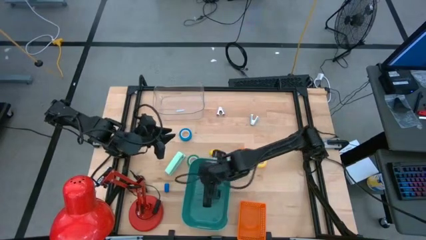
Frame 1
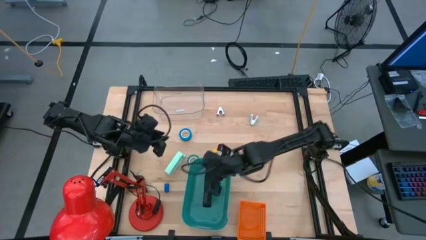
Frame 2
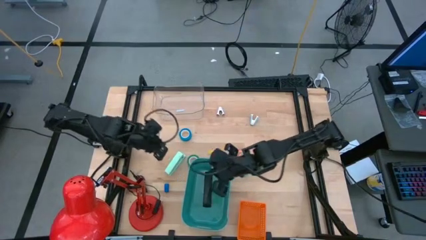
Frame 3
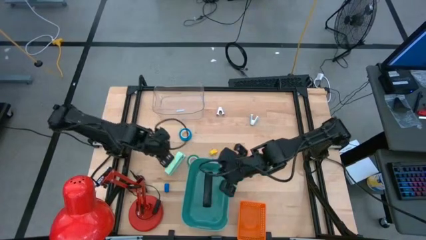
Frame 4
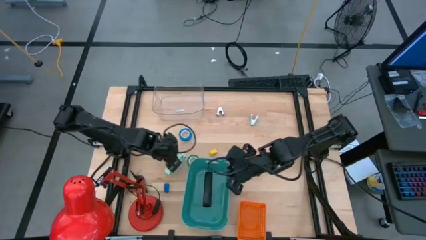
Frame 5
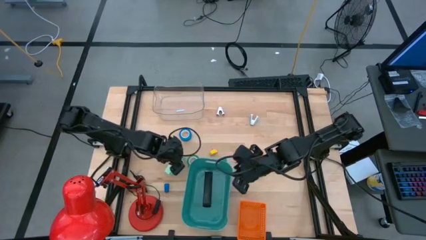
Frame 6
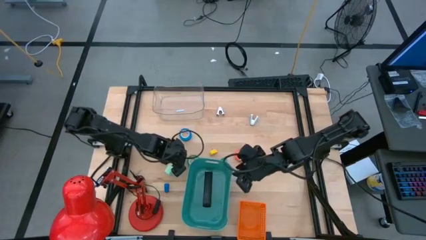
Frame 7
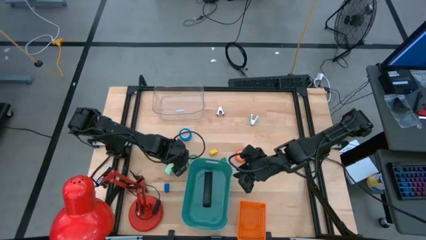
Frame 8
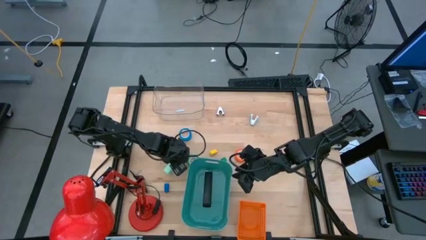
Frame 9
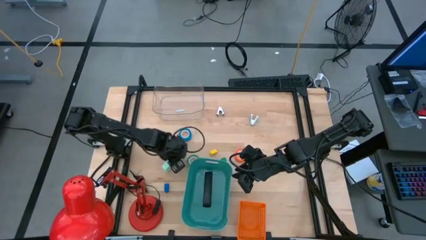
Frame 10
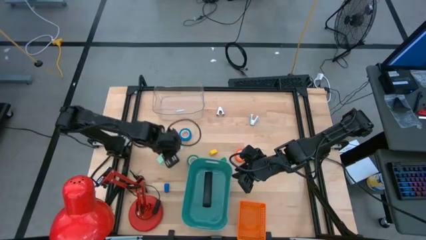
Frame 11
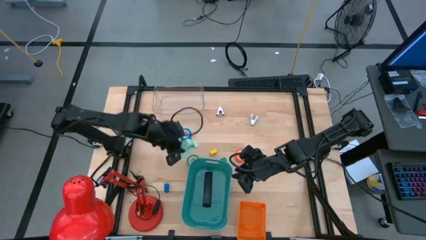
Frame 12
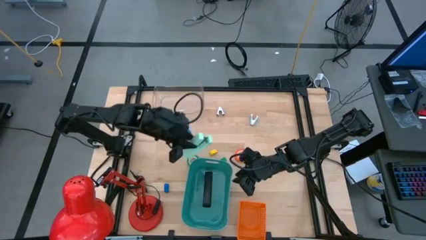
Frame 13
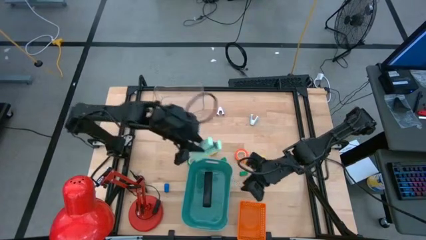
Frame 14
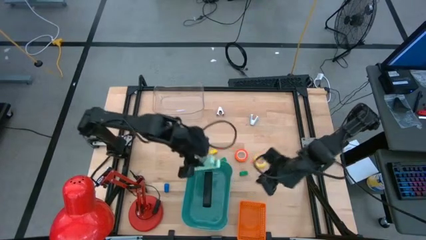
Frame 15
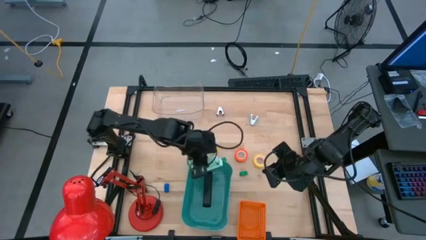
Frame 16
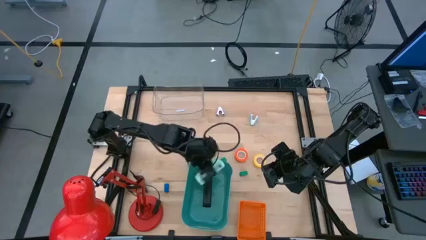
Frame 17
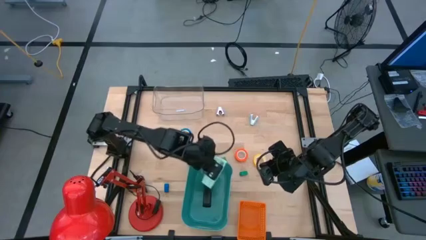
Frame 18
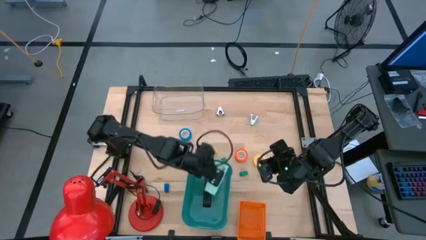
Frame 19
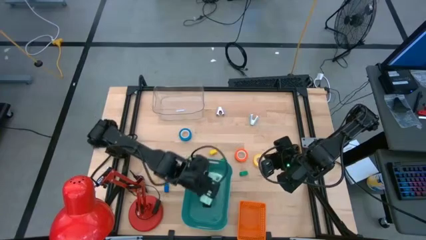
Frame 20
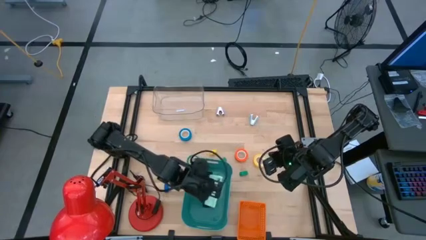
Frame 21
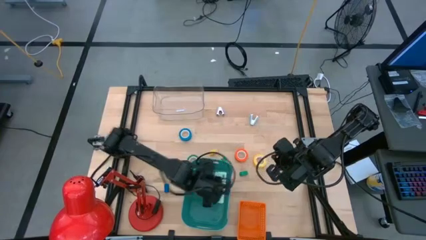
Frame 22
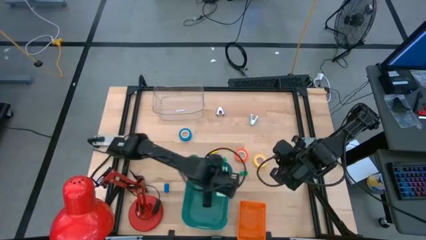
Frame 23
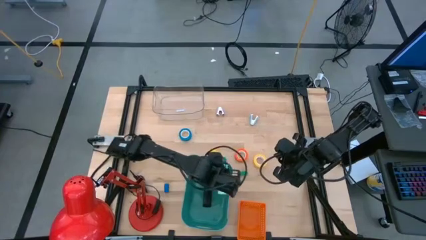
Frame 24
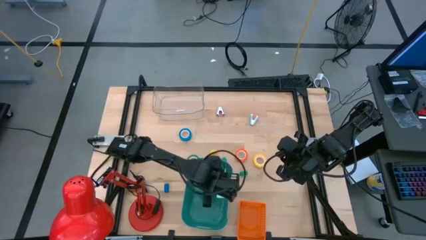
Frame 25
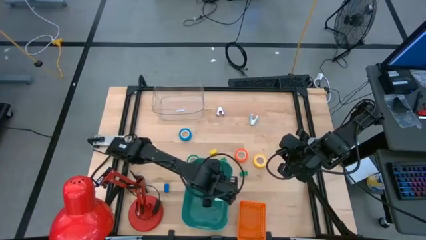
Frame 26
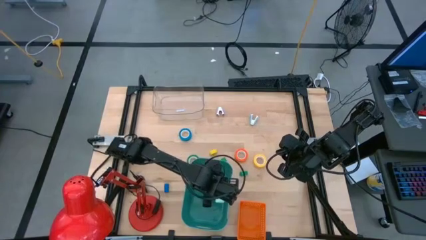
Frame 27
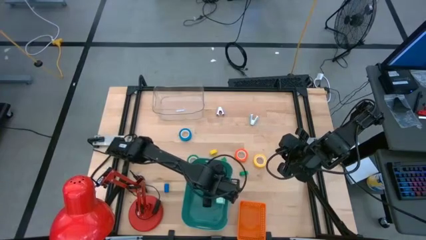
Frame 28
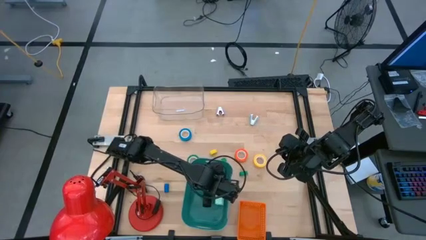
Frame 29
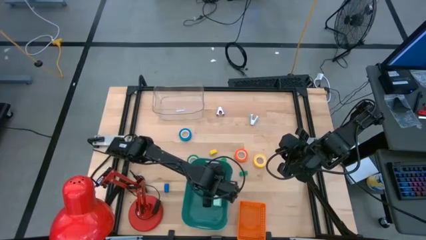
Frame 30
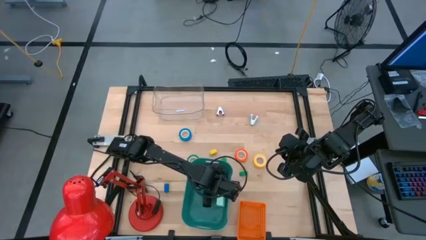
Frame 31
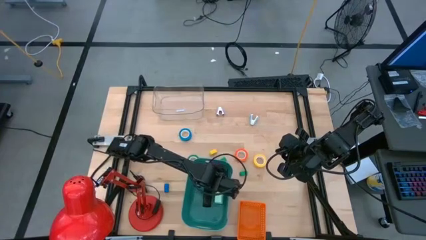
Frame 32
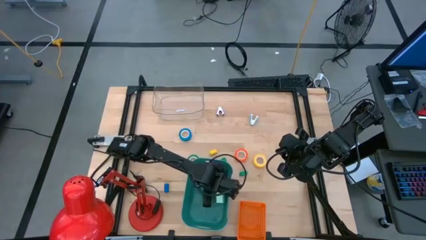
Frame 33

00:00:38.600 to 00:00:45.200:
Task: Pick and place Stapler, Stapler remover, tape
Put the light green stapler into the green bin

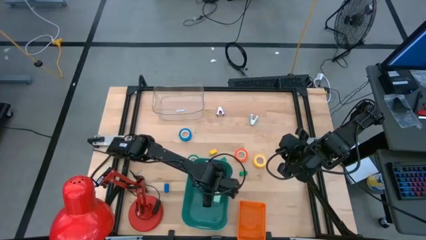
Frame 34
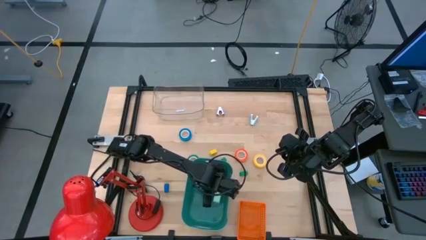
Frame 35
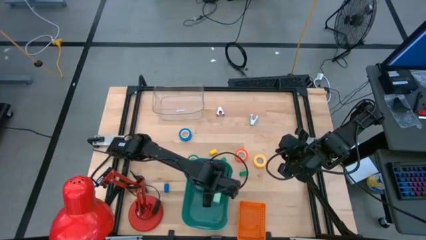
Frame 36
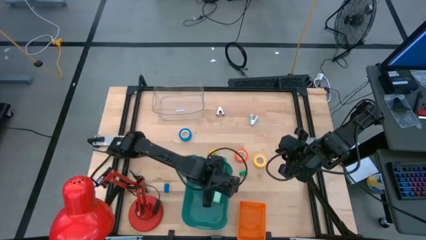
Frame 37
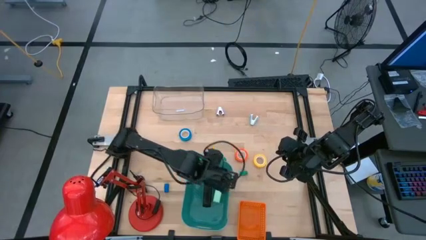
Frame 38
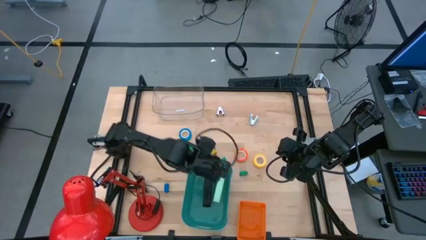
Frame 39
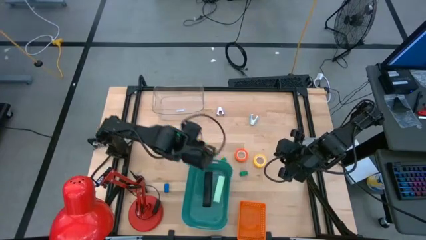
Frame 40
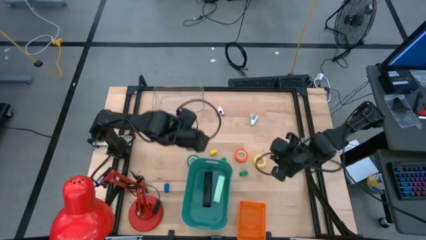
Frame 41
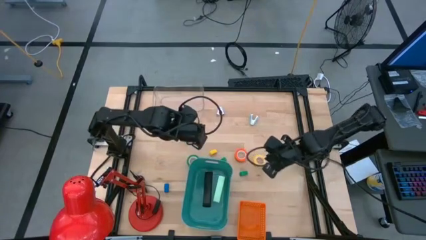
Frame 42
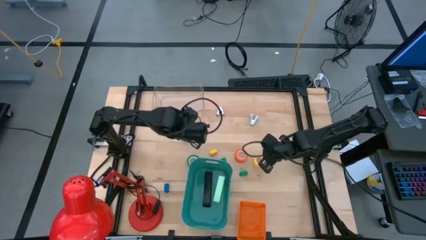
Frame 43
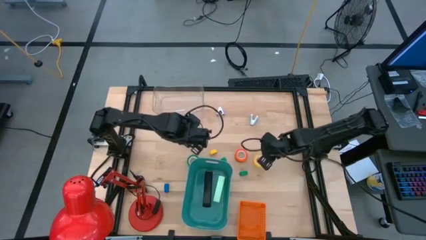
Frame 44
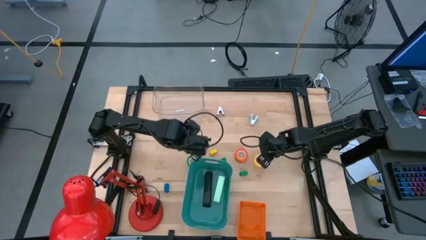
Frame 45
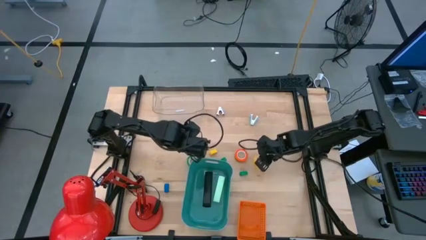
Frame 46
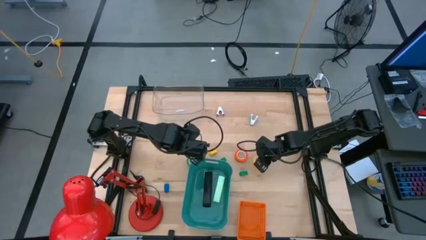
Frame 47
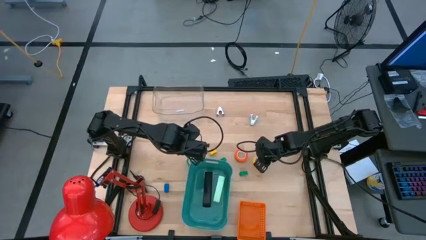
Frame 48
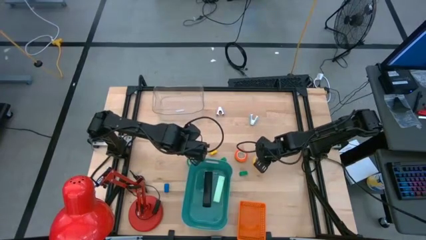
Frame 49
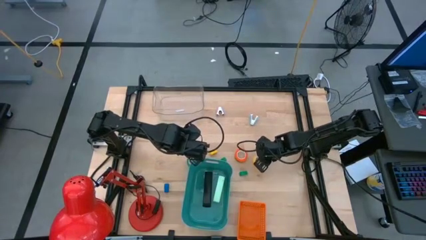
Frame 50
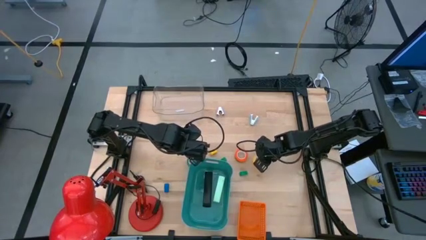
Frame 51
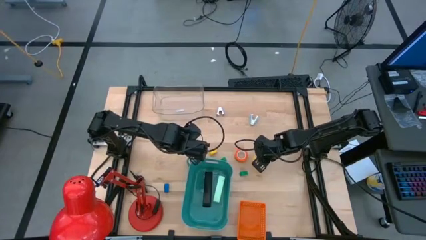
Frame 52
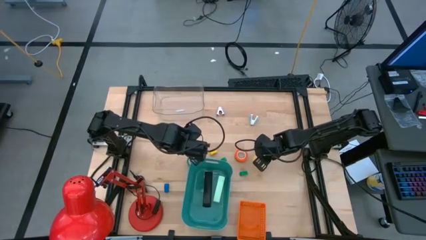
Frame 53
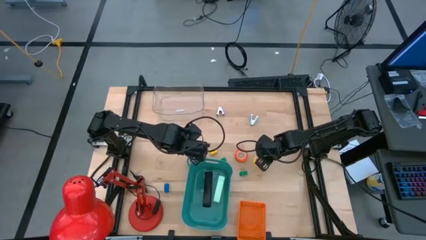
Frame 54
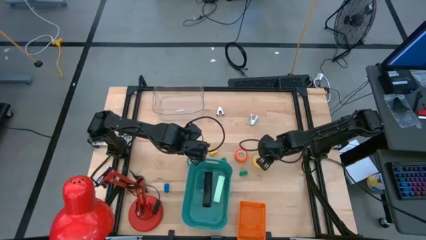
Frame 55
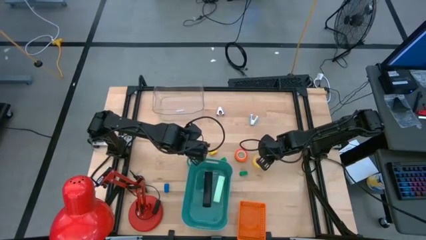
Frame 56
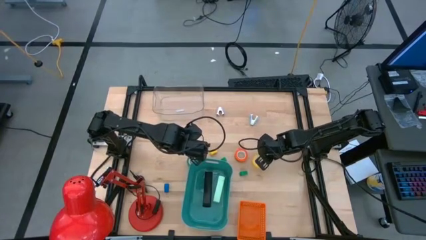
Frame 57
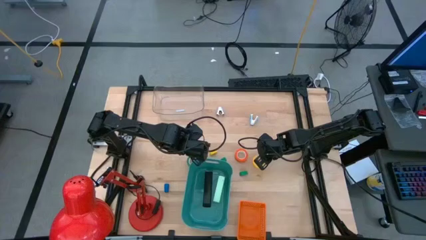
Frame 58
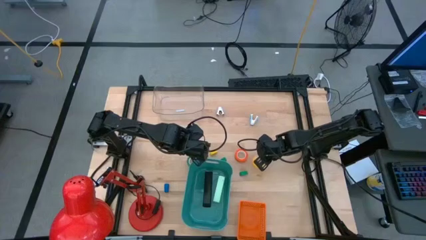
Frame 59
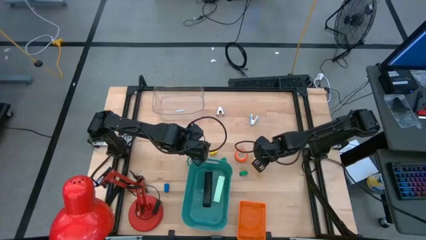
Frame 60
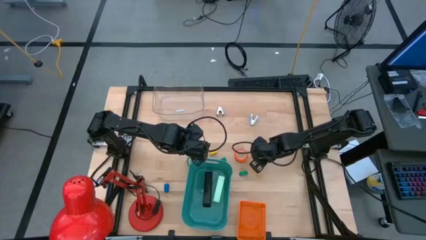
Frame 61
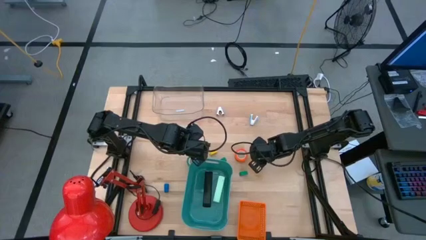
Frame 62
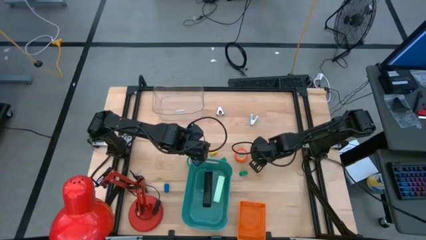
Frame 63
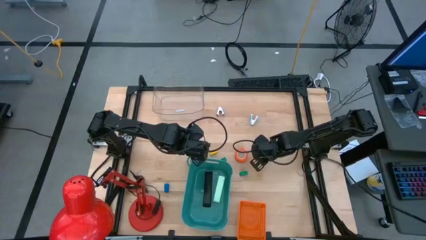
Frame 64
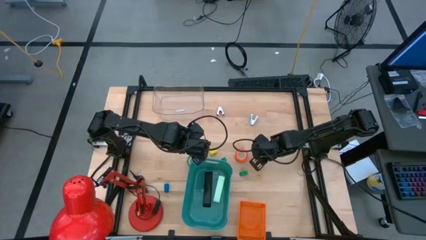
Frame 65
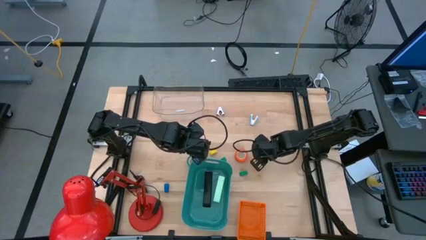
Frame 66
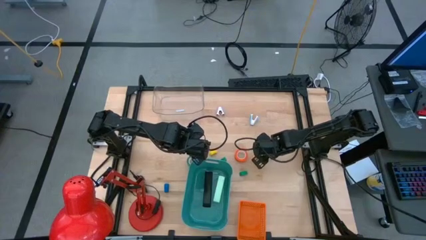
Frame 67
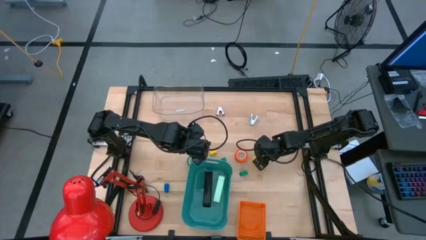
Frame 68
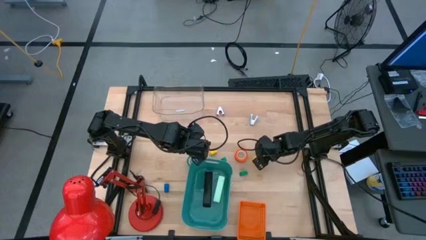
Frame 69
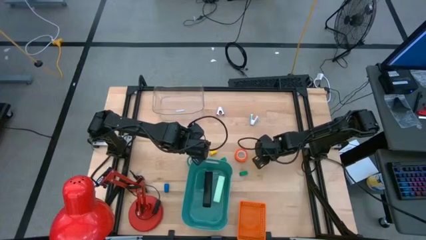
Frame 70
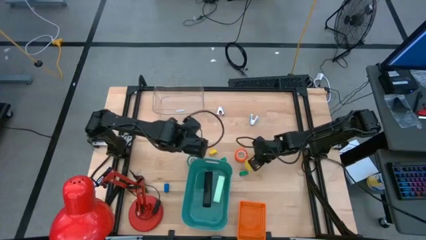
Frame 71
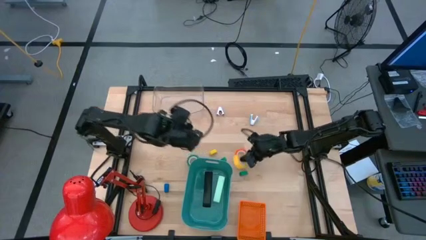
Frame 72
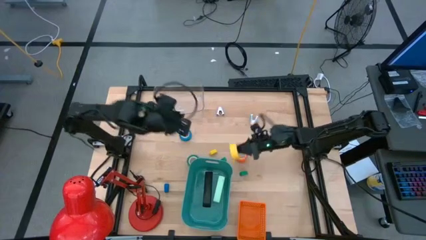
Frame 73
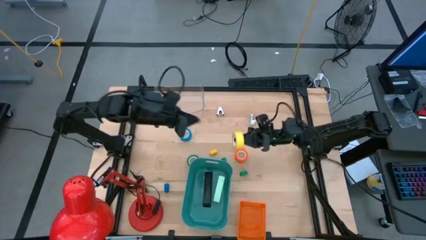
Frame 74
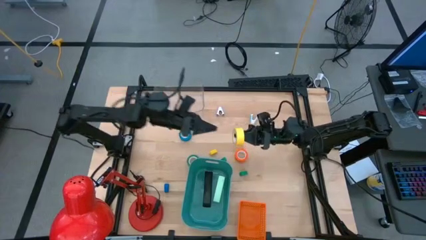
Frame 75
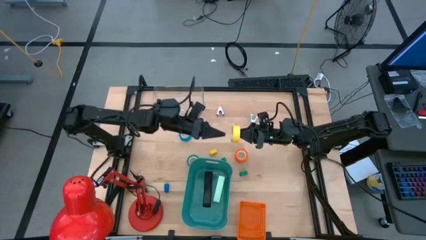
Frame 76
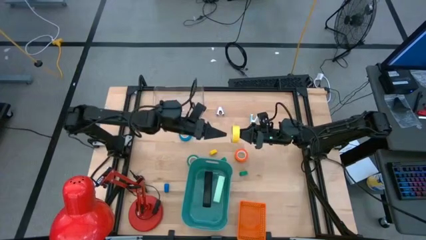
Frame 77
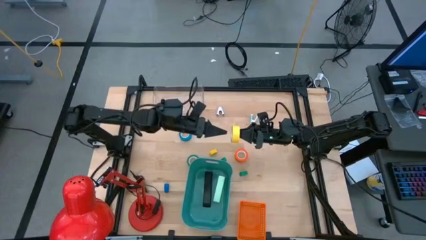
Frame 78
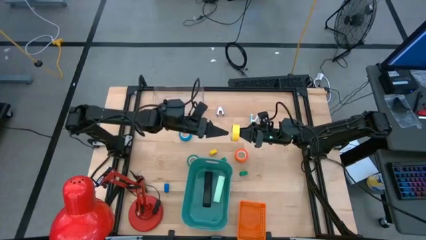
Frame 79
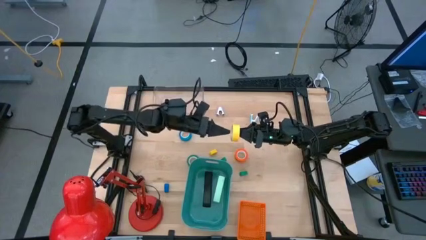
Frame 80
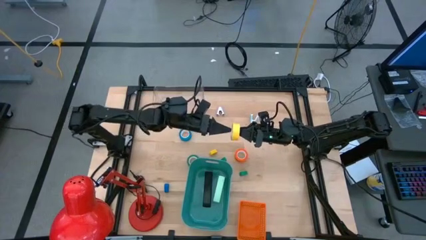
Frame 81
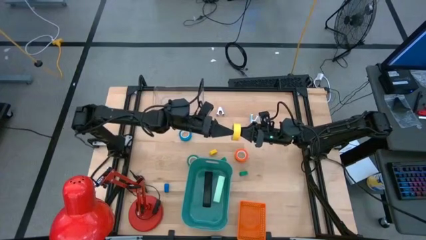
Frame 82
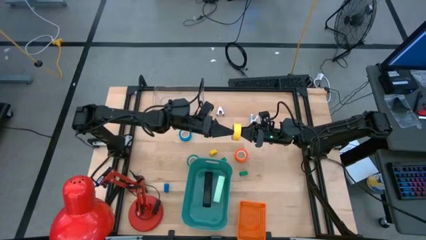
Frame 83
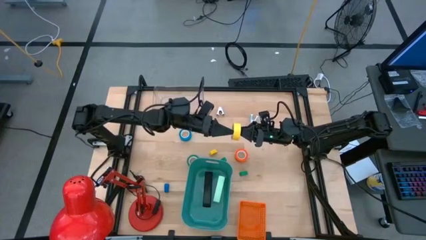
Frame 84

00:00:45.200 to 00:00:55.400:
Put the yellow tape into the transparent bin
